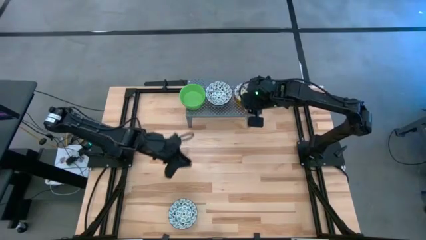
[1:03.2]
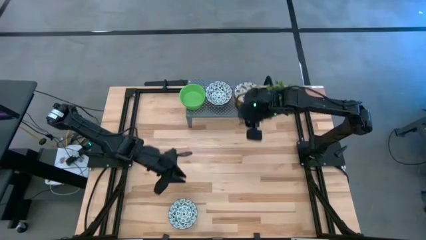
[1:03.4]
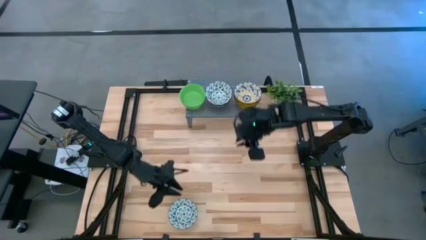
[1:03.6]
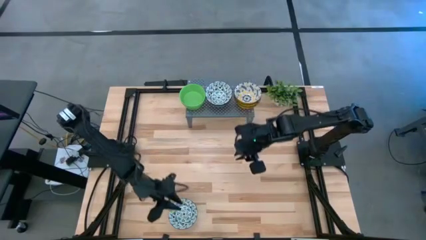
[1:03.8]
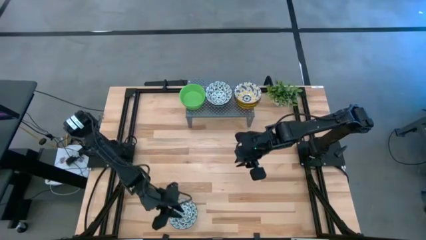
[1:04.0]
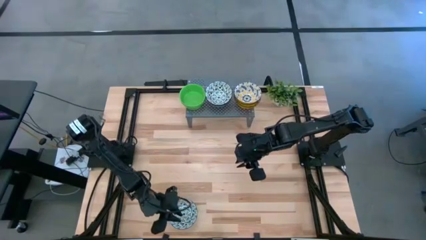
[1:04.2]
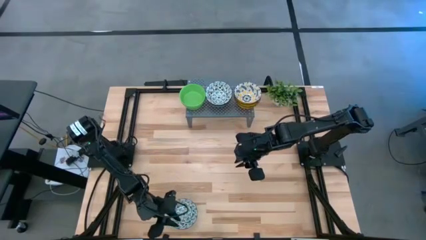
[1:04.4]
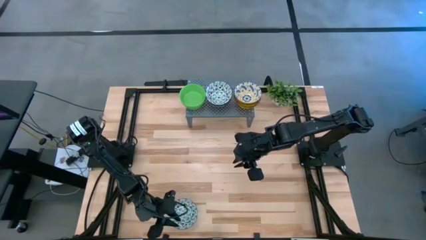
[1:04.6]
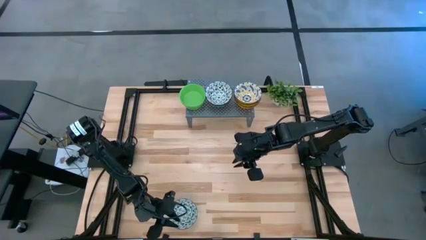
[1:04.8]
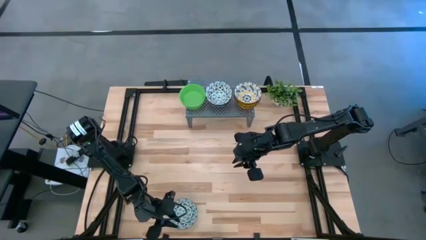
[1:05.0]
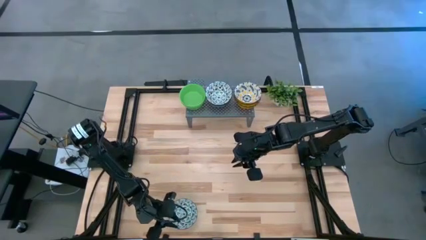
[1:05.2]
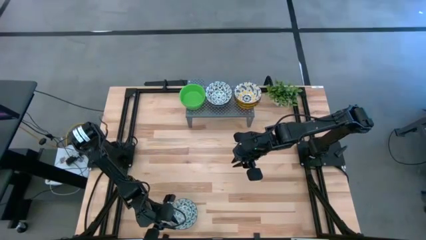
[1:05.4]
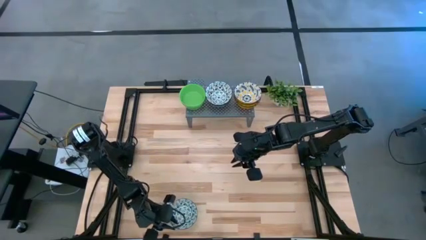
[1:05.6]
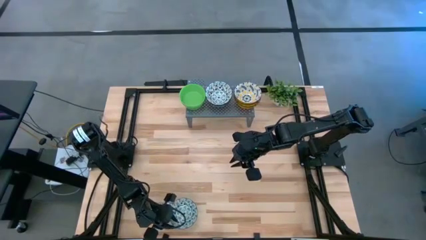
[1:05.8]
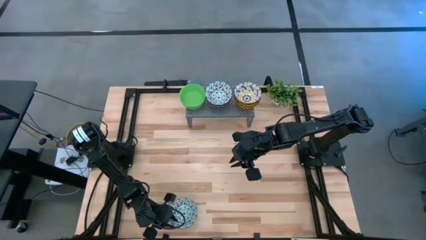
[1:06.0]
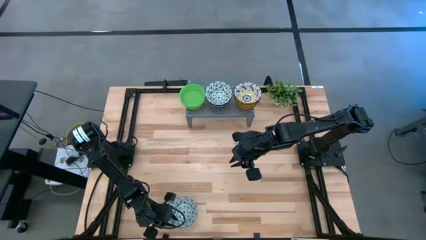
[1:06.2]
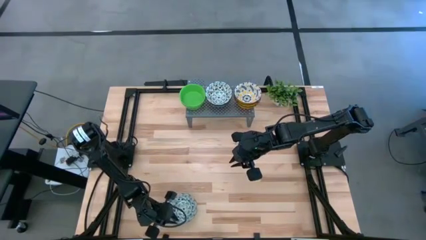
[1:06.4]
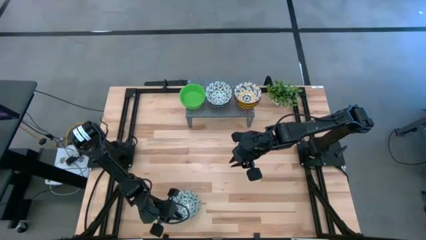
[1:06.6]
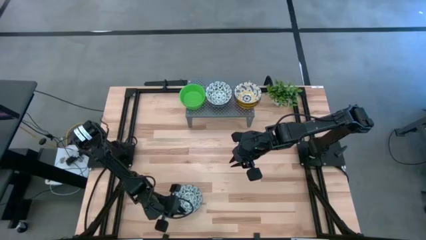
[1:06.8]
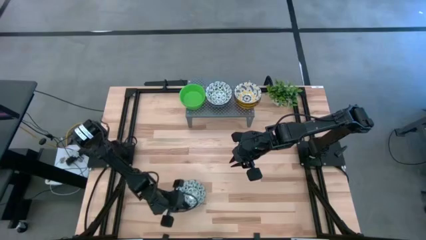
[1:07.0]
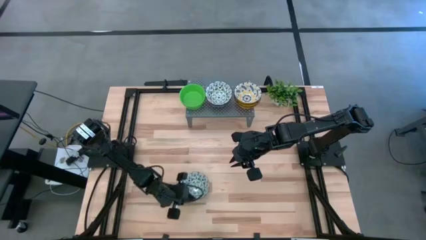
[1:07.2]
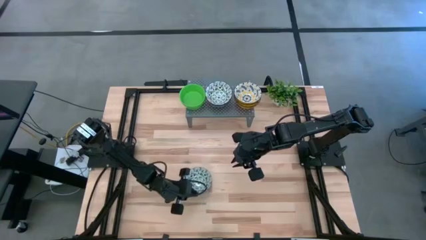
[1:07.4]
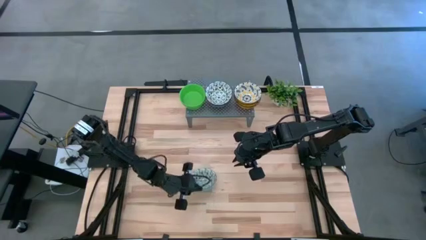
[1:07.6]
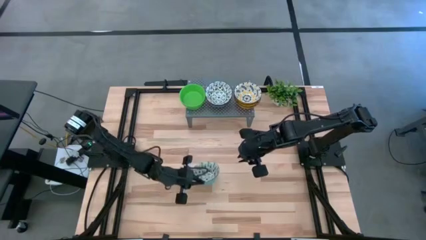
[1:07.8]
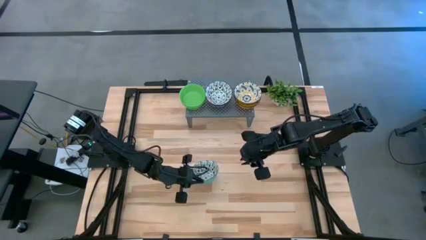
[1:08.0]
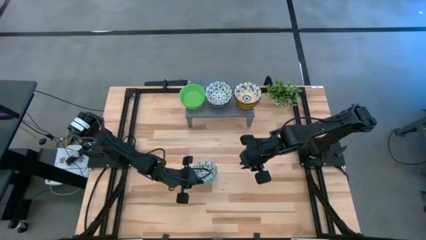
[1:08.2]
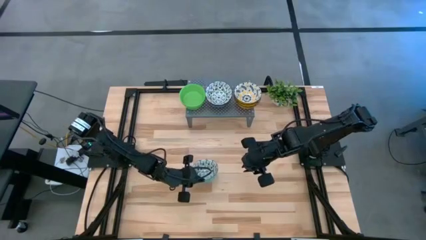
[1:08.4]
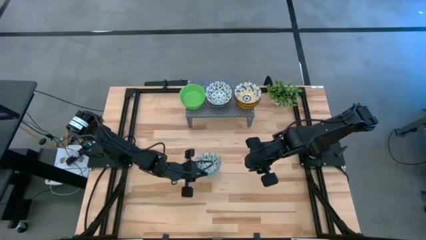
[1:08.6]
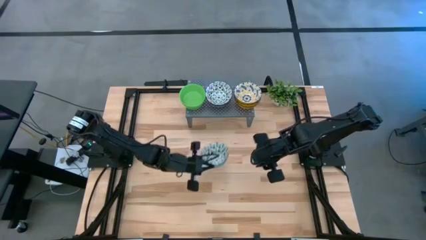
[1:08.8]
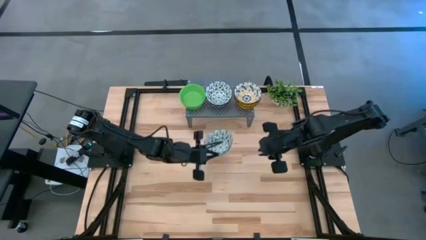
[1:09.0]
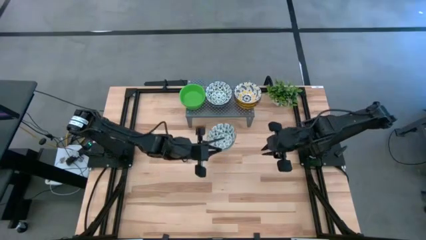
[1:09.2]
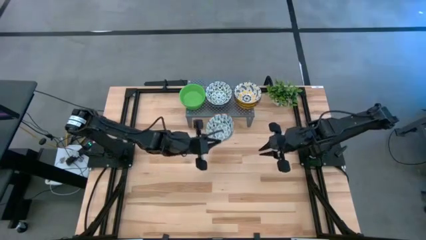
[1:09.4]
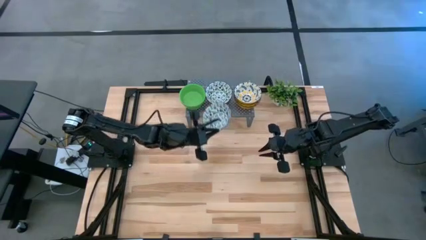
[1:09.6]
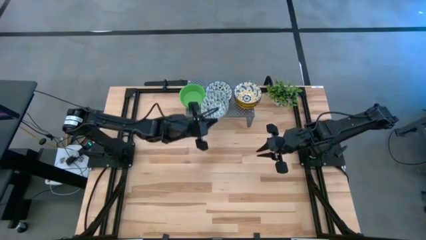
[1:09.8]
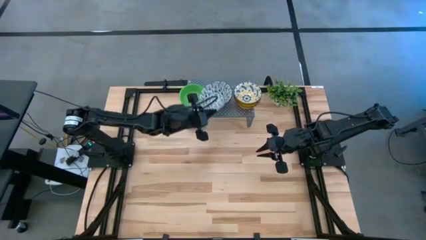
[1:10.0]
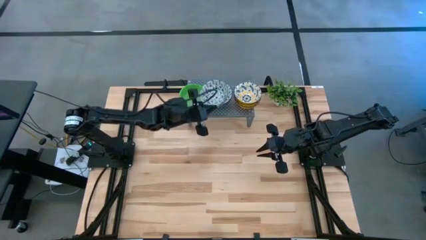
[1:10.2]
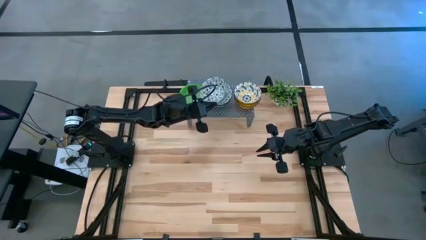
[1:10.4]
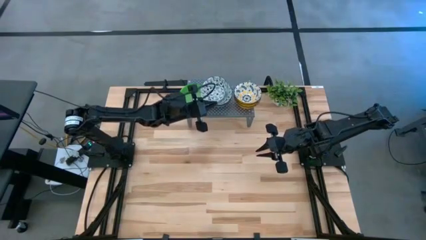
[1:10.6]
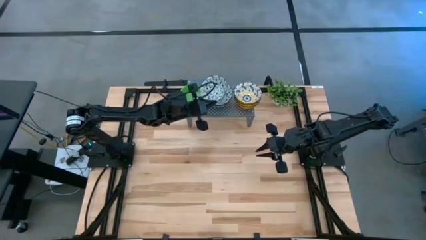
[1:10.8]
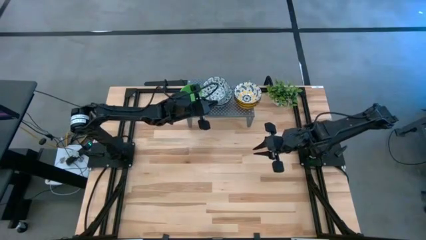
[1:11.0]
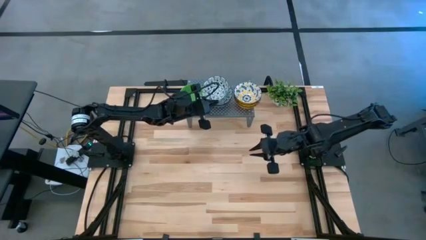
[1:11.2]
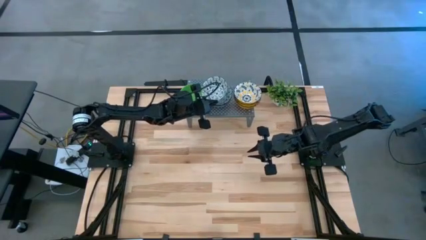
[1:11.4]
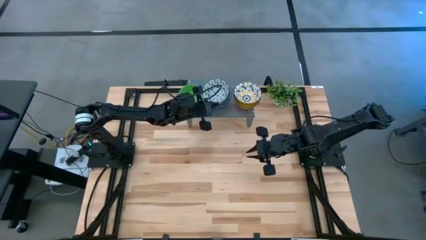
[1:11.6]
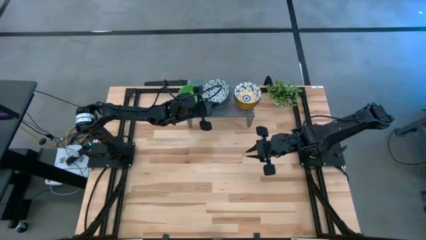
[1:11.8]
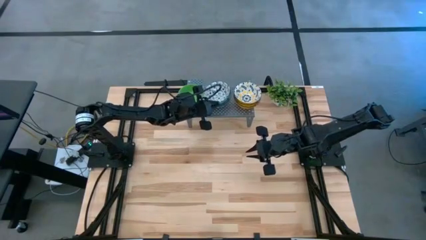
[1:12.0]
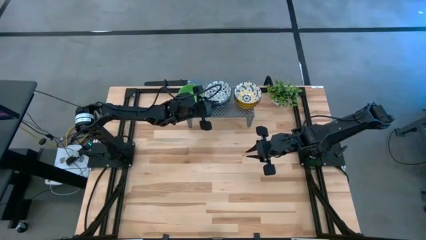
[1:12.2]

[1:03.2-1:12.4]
Task: Pick & Place Mini bowls
Stack the green patterned bowl on top of the green patterned bowl on the shelf

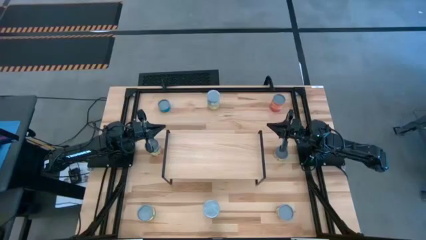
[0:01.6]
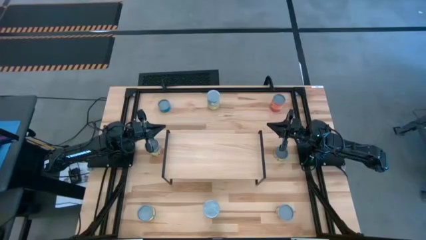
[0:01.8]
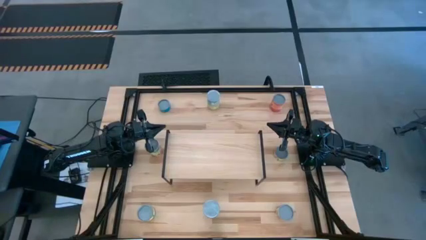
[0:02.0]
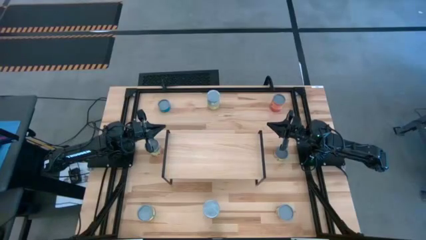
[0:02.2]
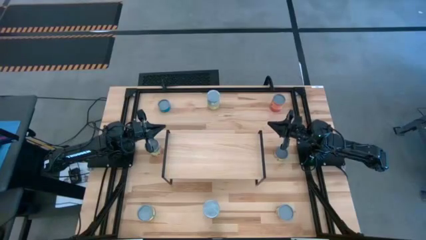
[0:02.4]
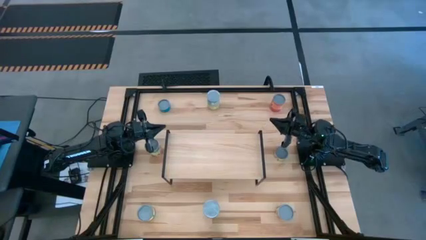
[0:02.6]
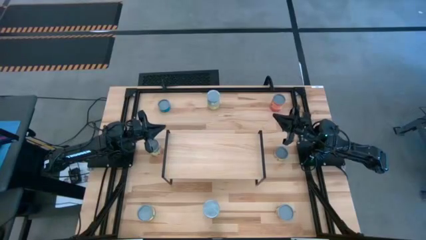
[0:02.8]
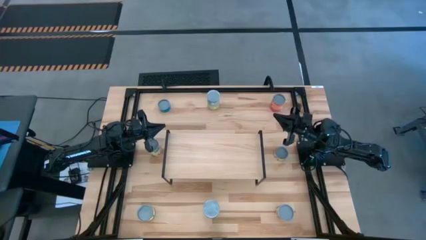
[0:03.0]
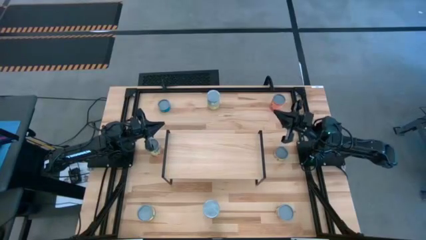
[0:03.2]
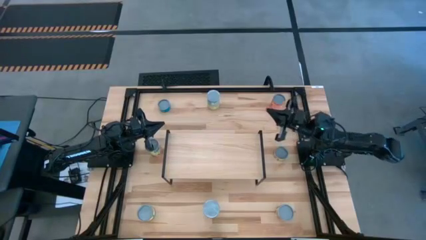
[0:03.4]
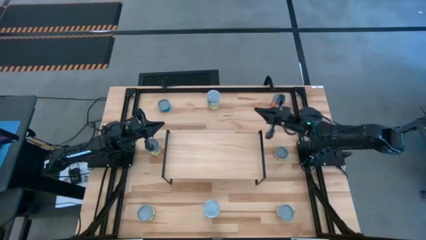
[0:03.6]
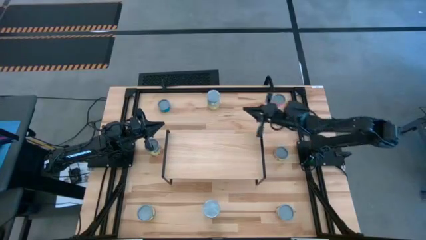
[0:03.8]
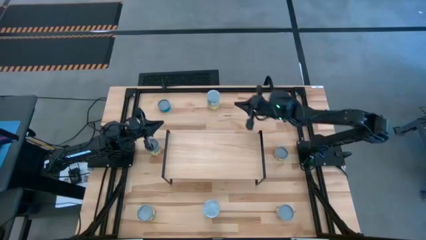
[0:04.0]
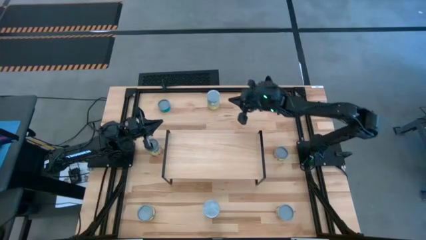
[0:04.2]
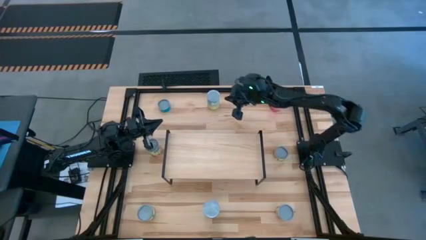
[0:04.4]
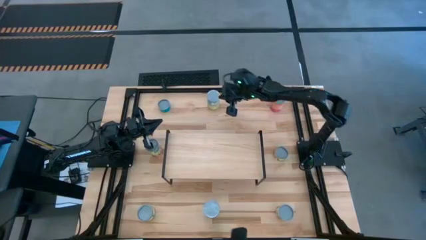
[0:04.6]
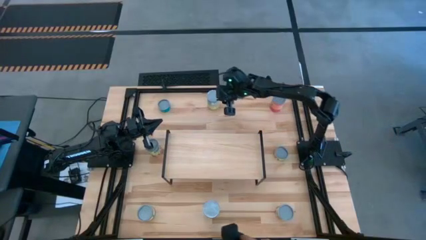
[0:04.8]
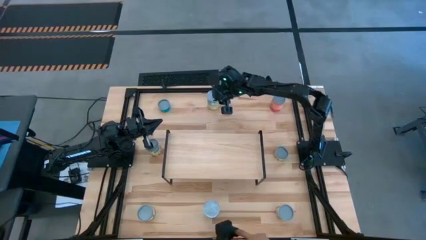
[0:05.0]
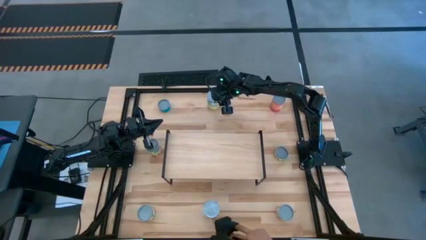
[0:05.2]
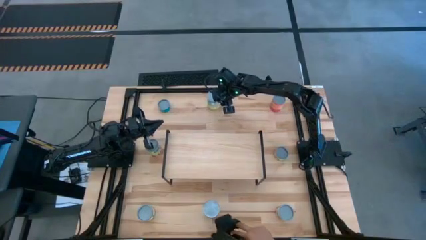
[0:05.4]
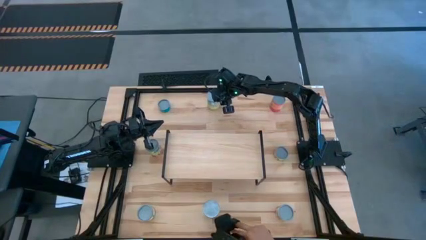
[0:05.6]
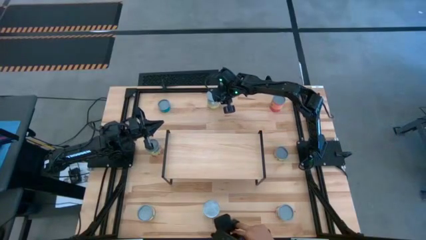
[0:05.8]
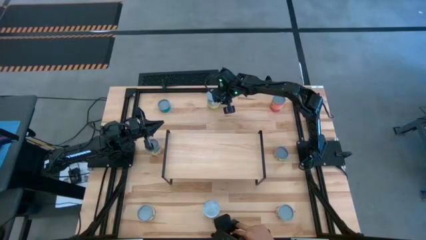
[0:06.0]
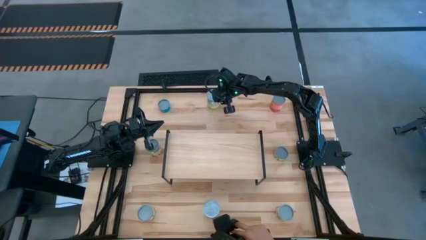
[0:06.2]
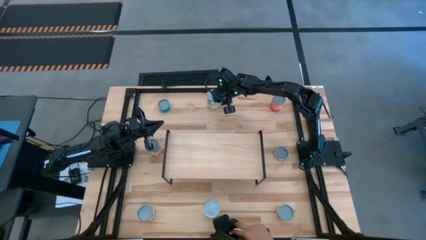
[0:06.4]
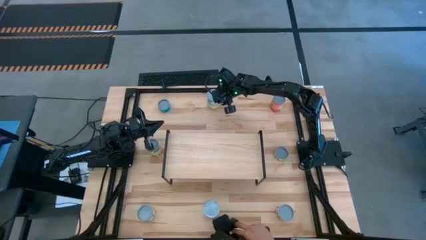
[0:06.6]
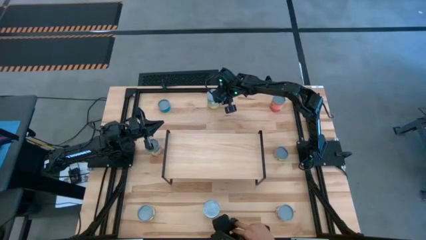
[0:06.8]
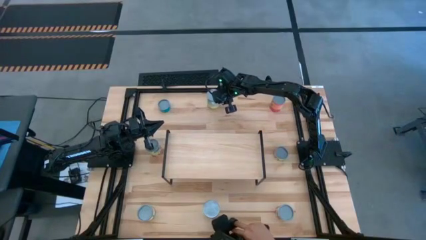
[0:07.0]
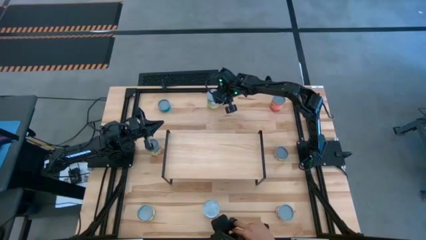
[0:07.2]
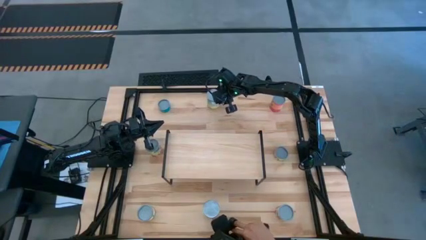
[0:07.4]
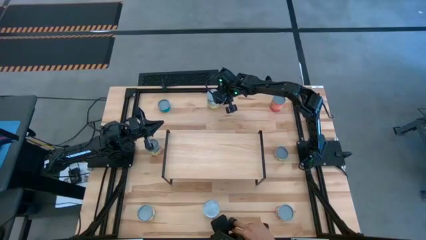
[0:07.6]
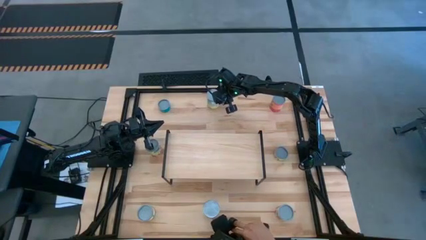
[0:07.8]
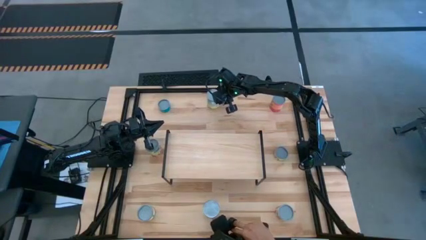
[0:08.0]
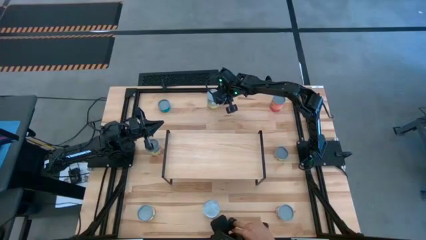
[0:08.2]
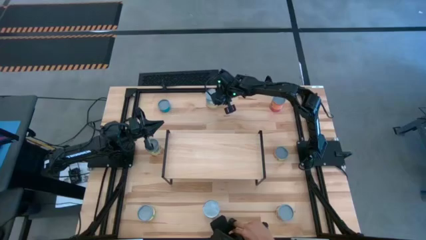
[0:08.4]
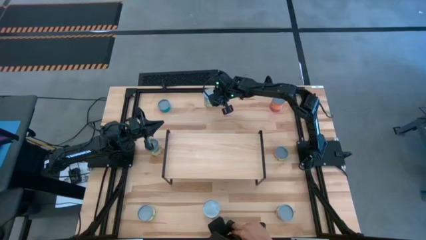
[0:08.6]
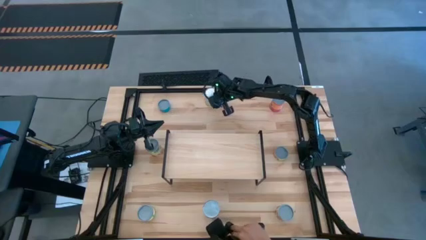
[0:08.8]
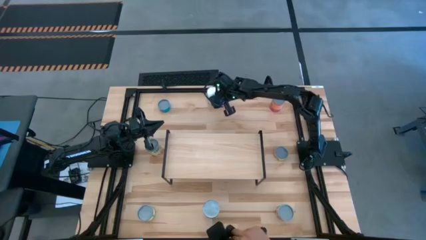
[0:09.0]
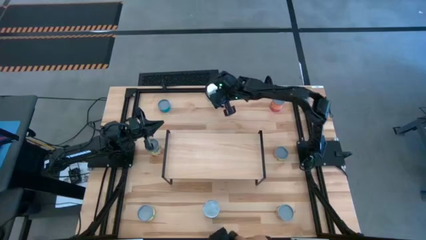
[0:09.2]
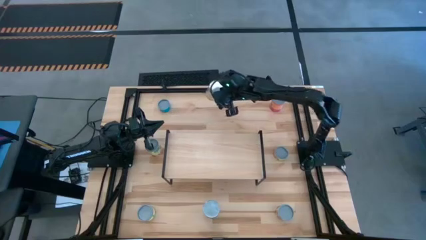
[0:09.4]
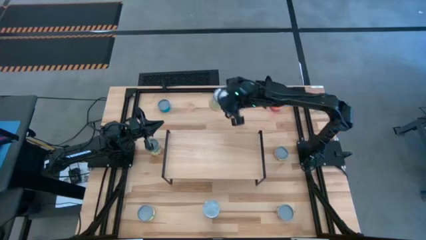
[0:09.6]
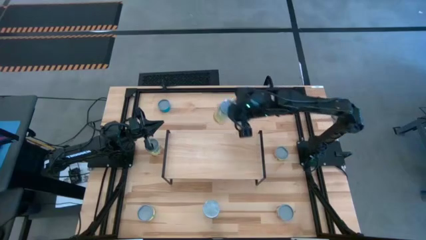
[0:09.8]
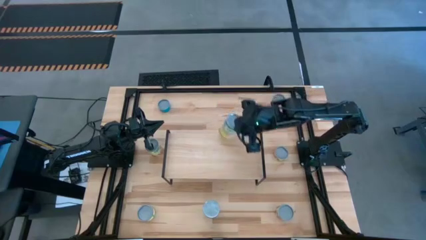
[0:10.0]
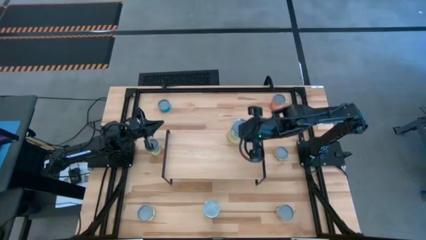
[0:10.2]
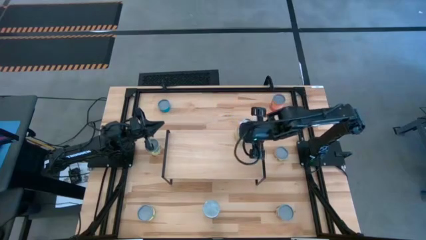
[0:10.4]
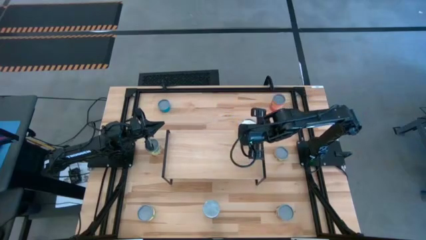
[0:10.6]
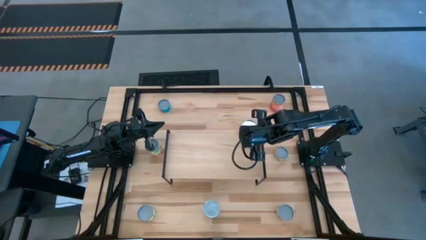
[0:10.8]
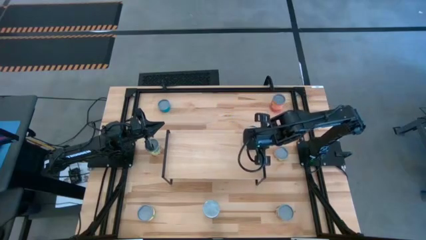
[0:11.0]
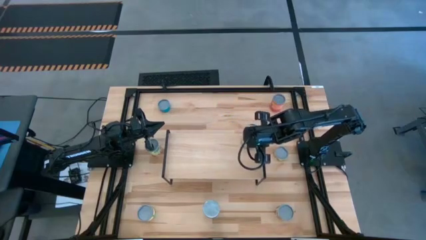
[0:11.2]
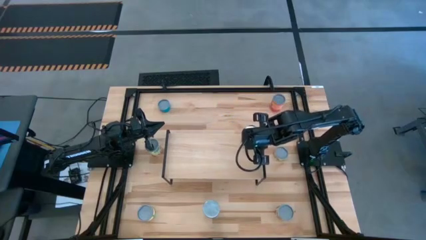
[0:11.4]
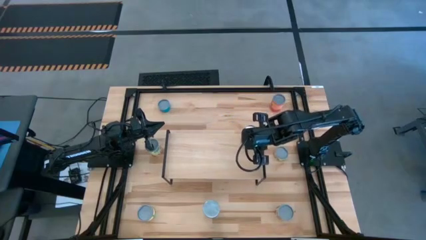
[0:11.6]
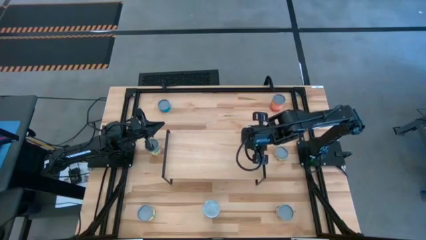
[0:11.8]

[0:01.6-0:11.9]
Task: Pick and place cans onto a shelf
Put the canned carrots on the shelf
